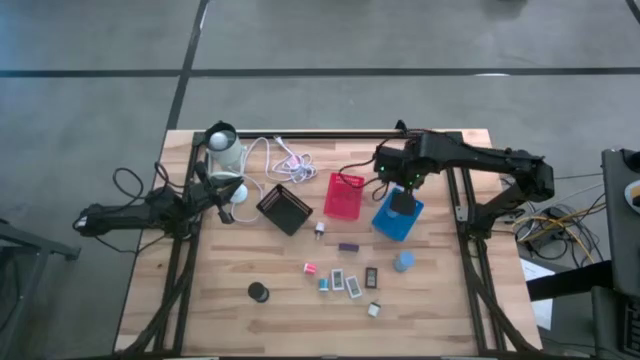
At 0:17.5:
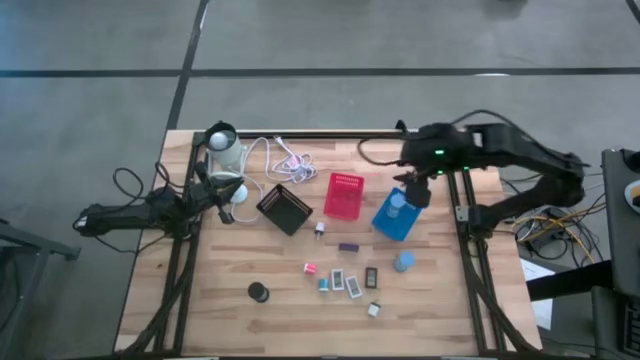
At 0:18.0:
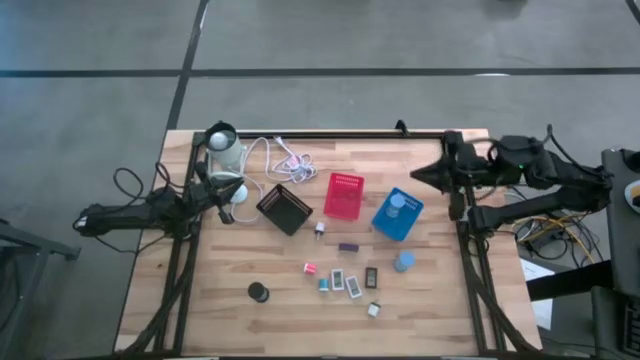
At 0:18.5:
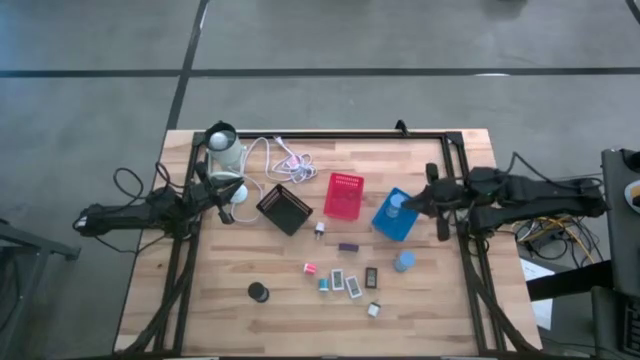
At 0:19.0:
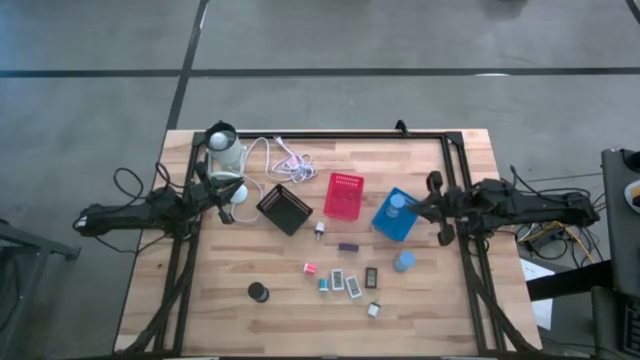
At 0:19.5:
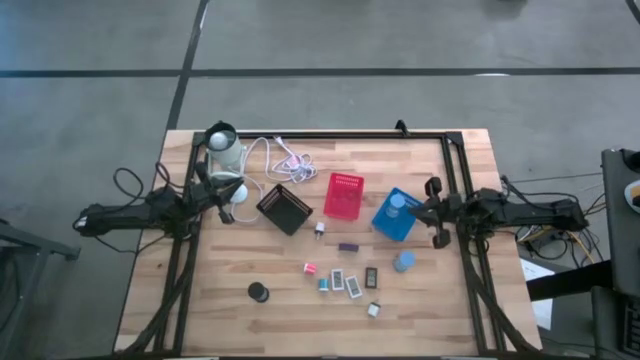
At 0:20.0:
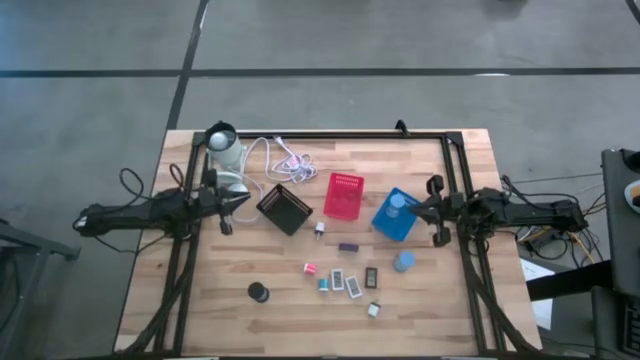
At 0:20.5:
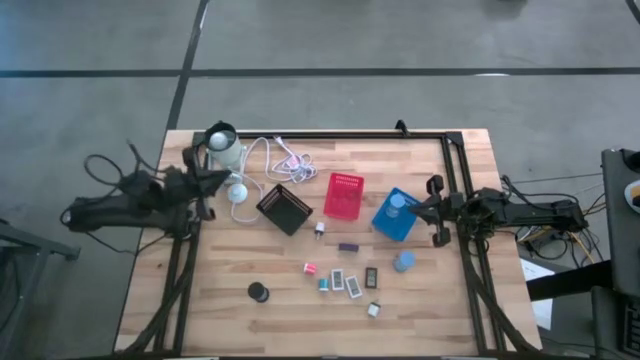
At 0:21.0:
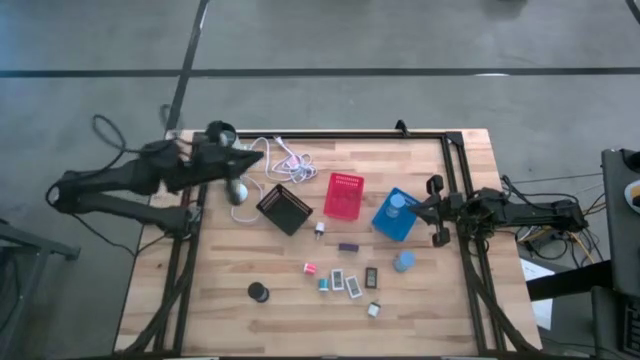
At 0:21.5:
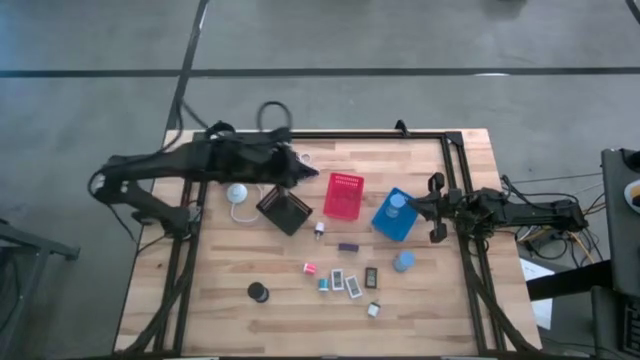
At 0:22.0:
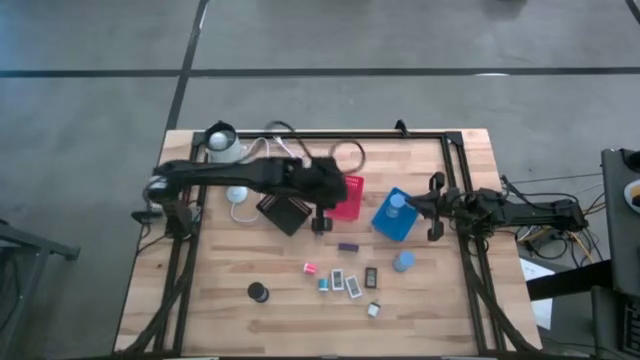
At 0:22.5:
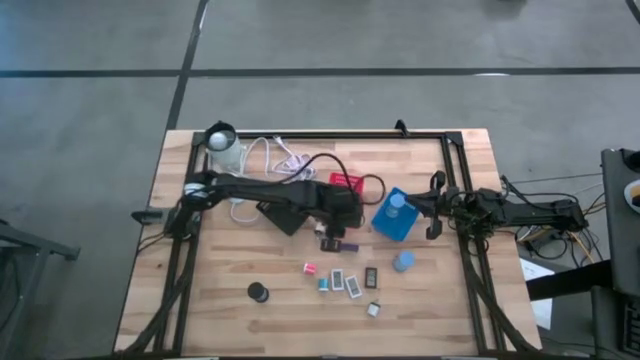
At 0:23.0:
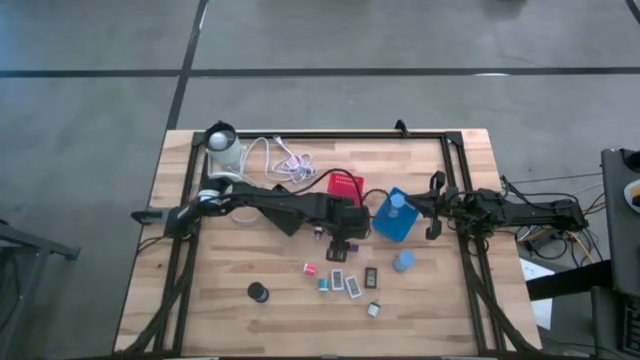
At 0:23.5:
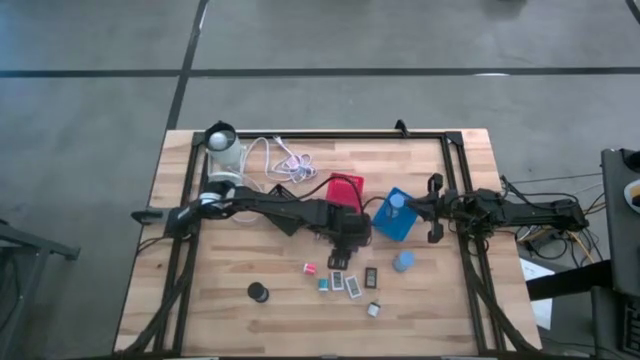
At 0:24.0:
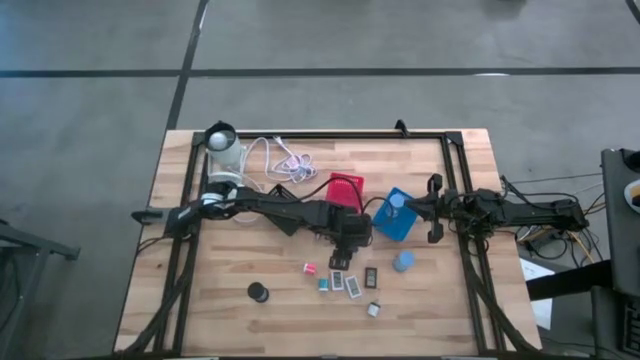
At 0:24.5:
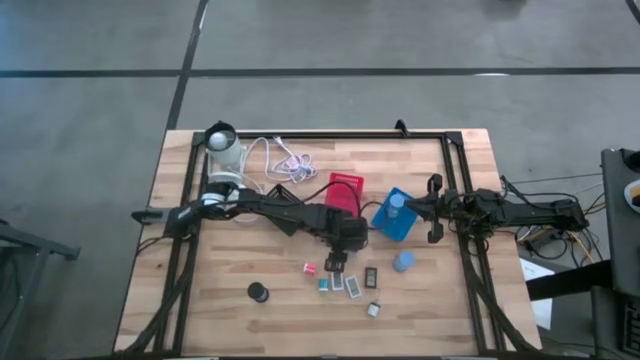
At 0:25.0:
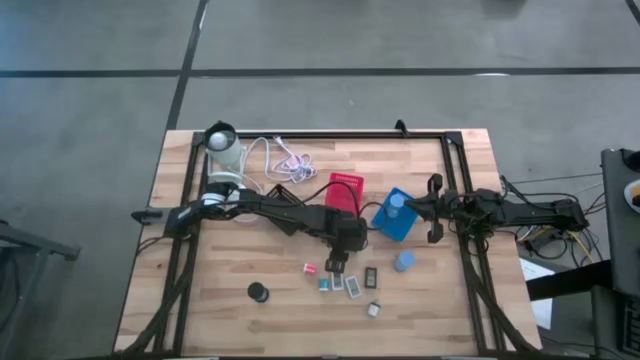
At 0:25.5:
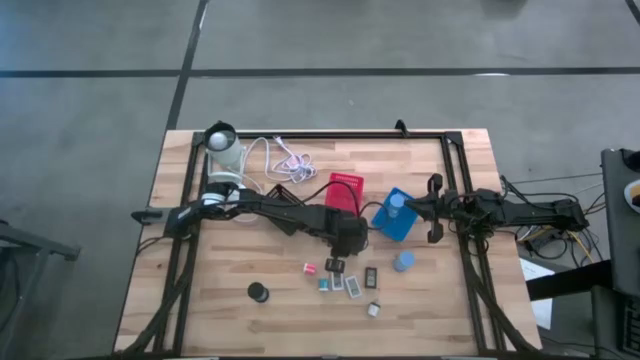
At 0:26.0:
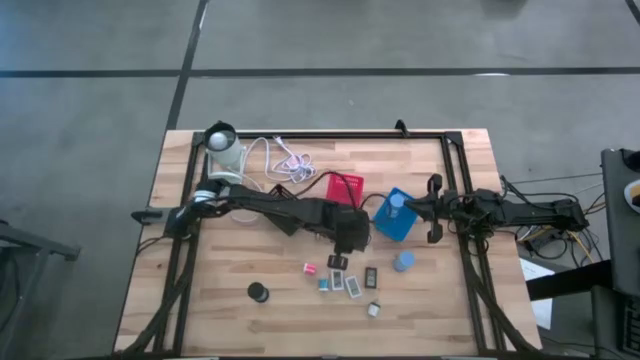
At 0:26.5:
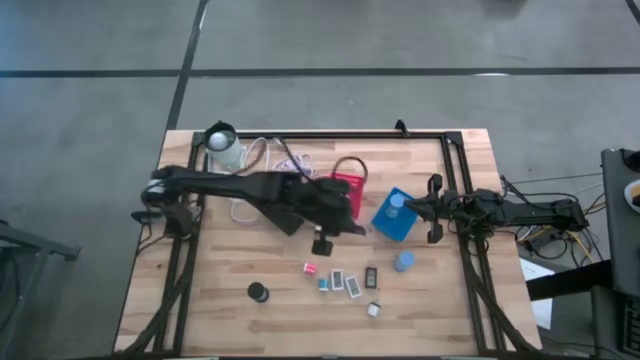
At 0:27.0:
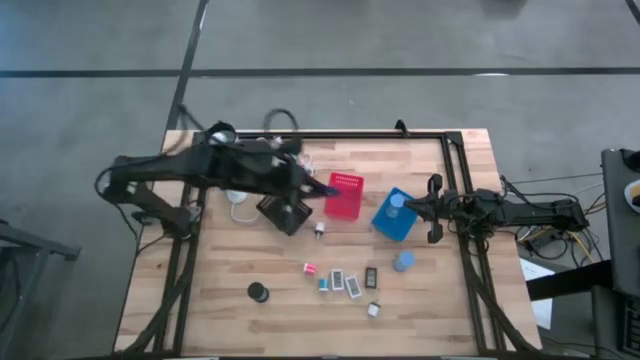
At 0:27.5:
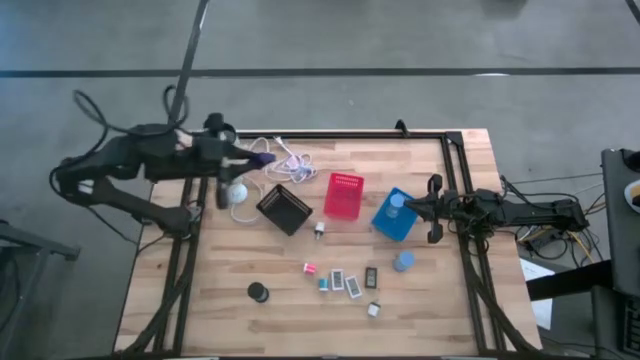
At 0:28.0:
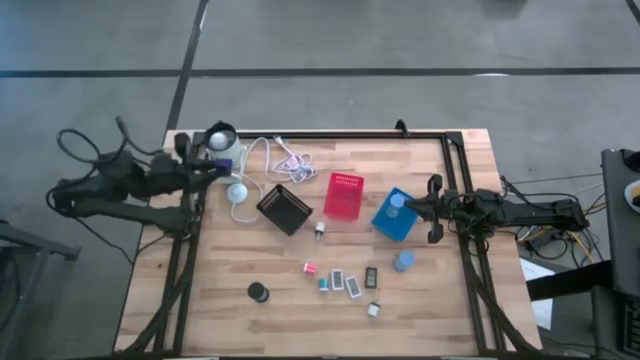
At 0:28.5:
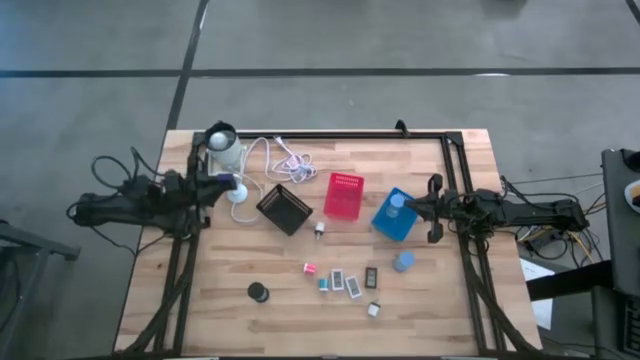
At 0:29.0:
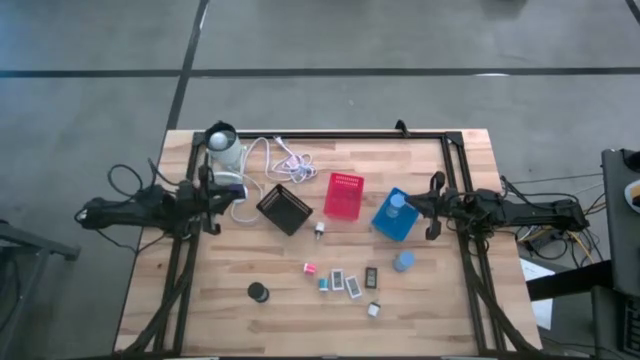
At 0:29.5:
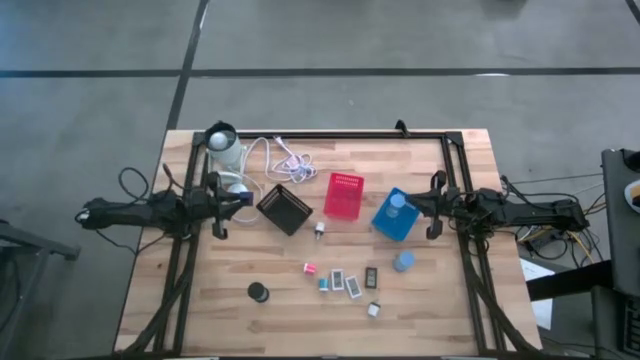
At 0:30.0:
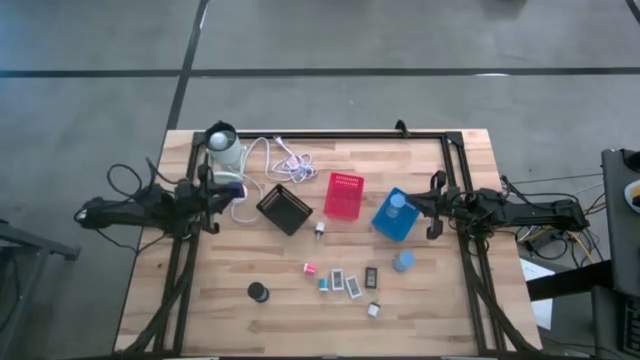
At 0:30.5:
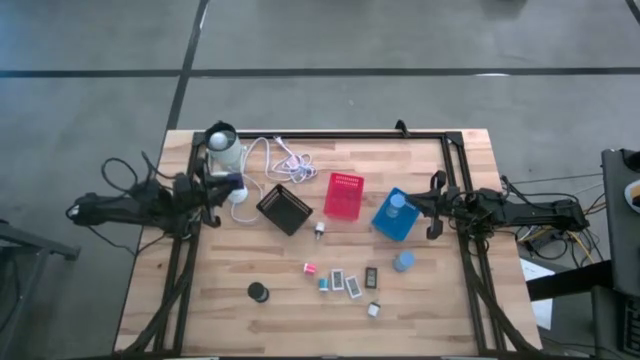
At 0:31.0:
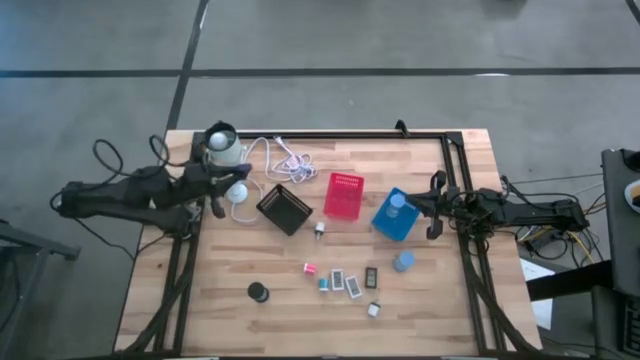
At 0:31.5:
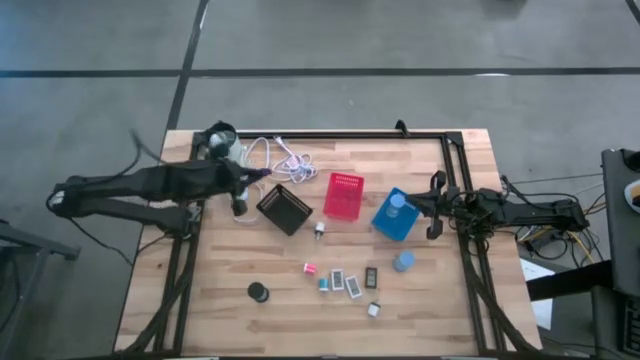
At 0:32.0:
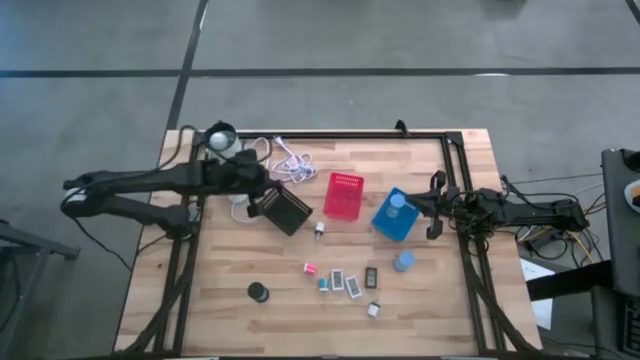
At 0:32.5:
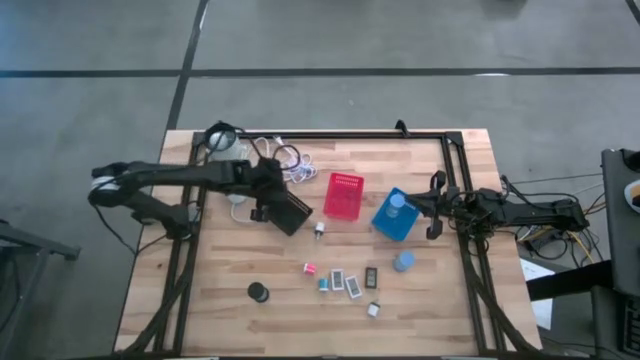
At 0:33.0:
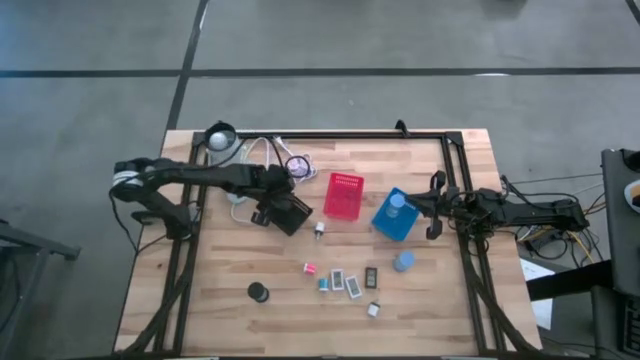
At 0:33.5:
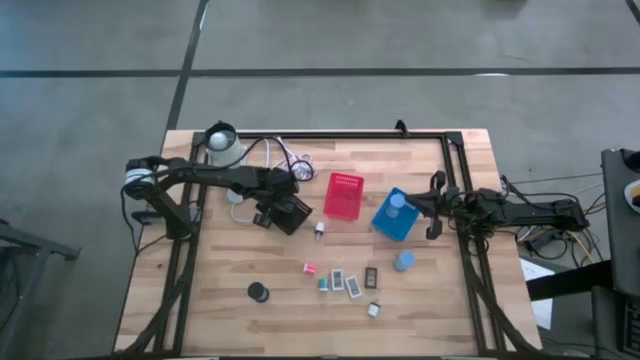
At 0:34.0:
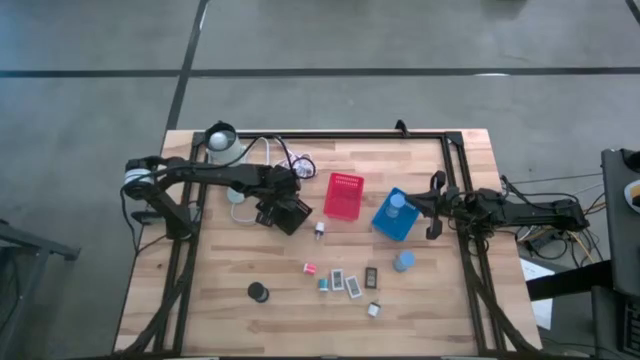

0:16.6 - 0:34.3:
Task: Pick & Place Office items
Put the violet digital clock into the black basket

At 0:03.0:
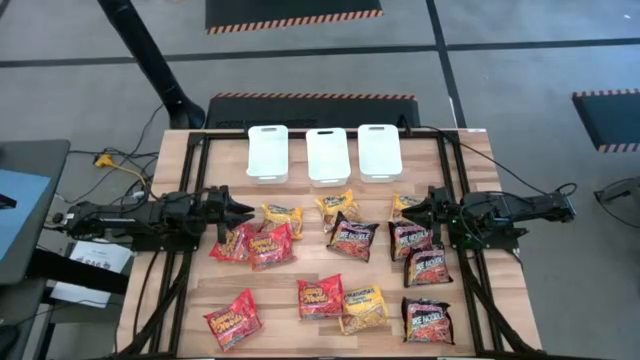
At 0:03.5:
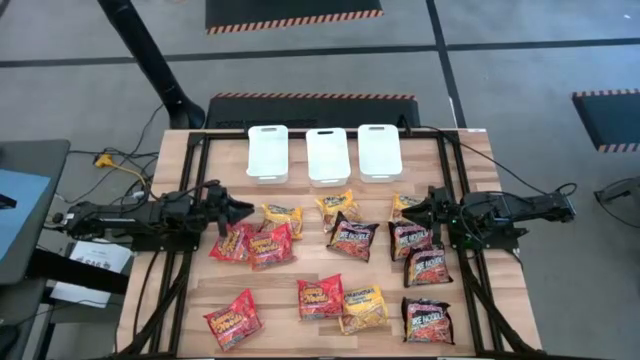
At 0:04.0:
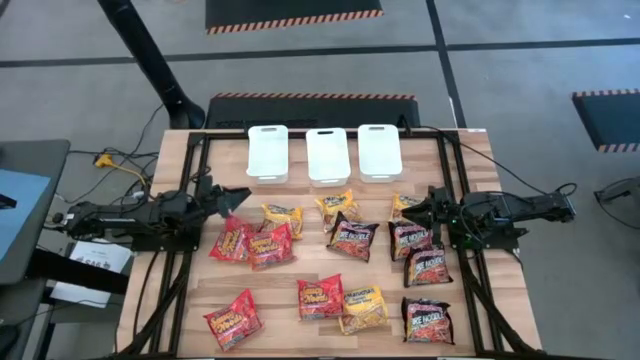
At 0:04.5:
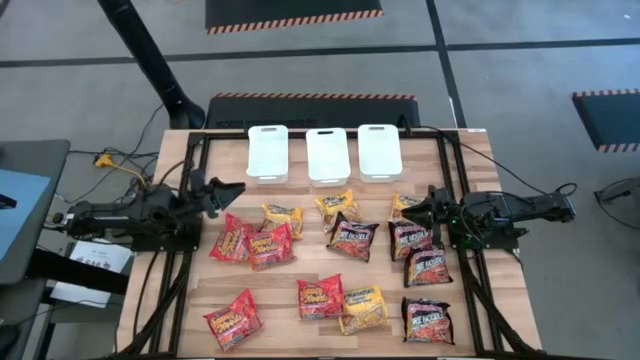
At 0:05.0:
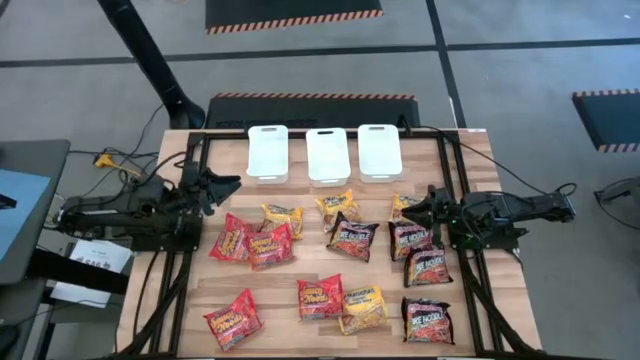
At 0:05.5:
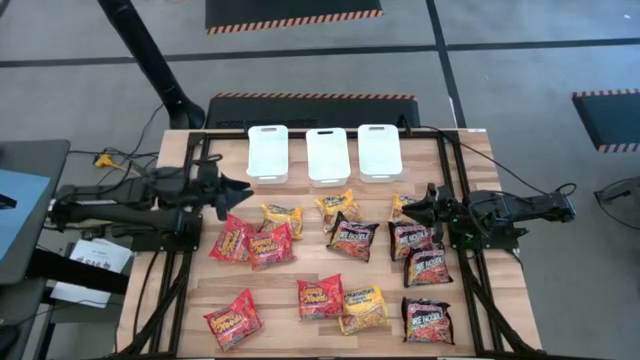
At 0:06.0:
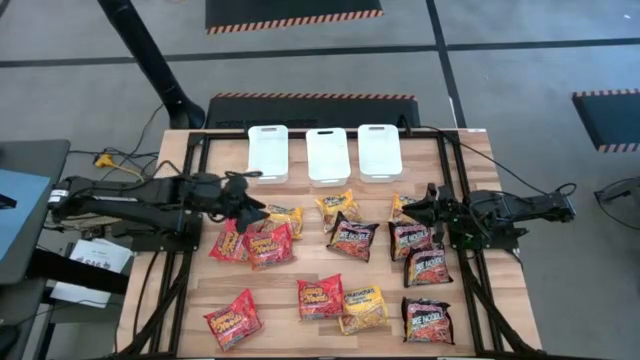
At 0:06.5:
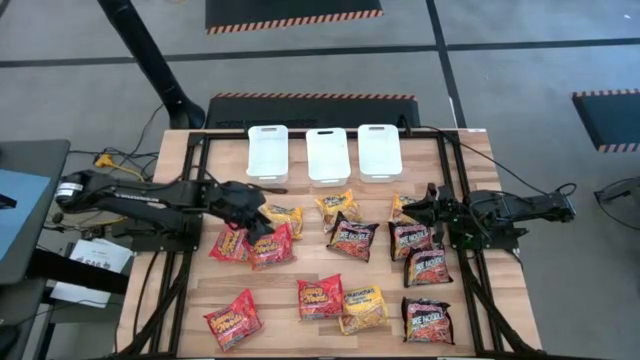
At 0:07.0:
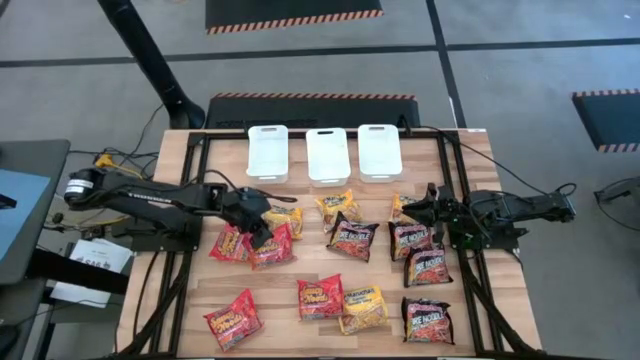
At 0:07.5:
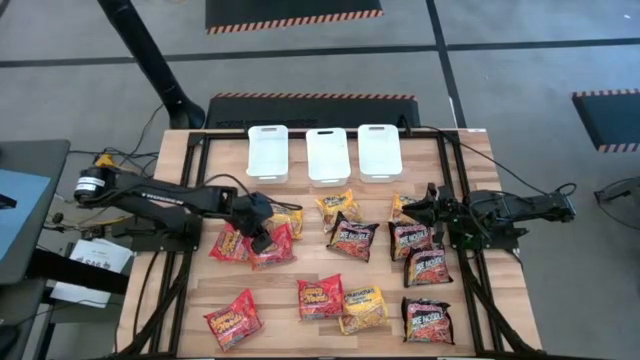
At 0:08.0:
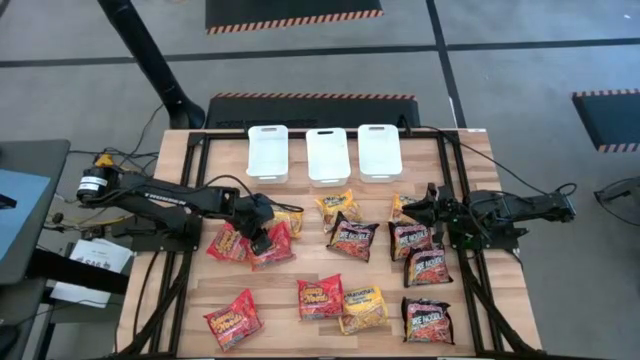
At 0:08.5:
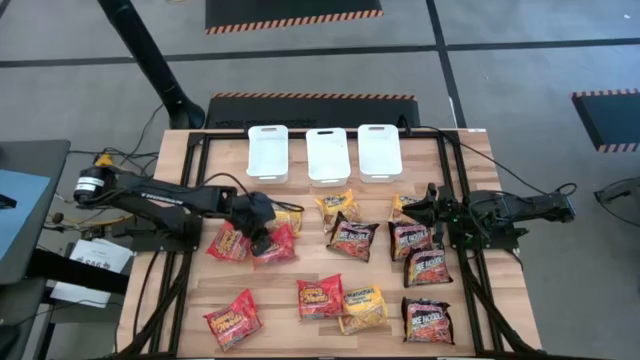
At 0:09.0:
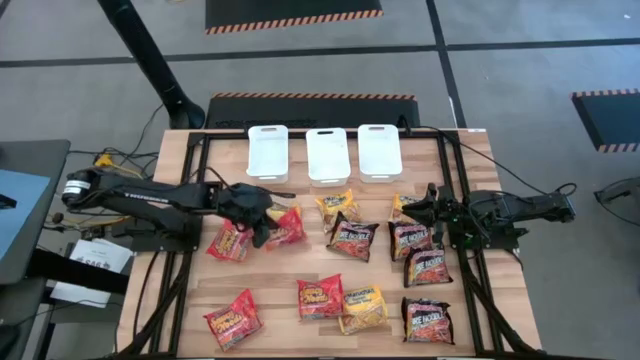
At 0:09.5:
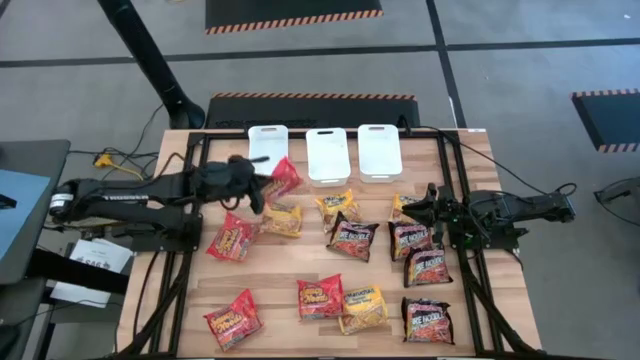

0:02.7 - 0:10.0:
Task: Sort Maruchan noodles
Put the orange noodle pack into the left white bin
